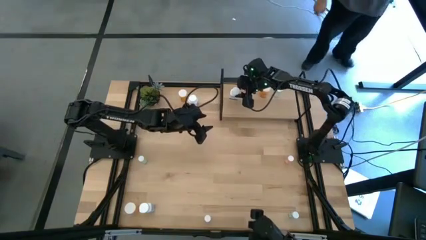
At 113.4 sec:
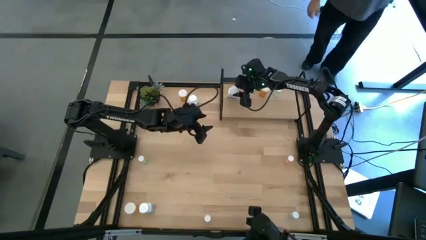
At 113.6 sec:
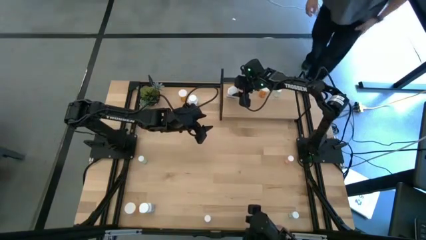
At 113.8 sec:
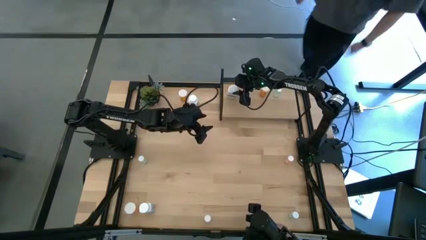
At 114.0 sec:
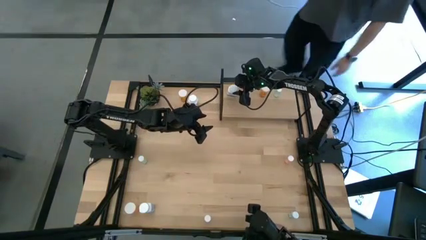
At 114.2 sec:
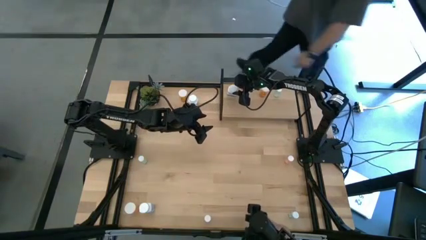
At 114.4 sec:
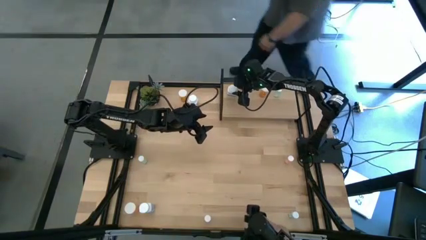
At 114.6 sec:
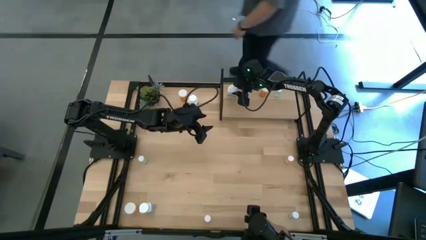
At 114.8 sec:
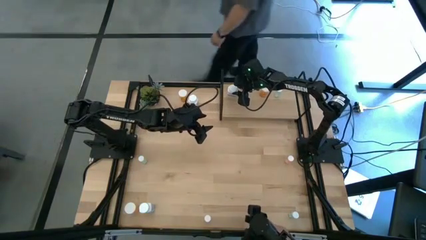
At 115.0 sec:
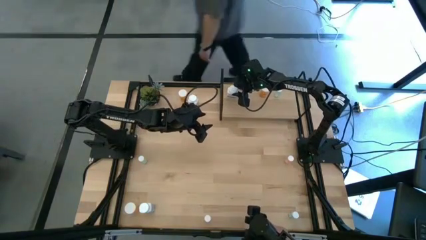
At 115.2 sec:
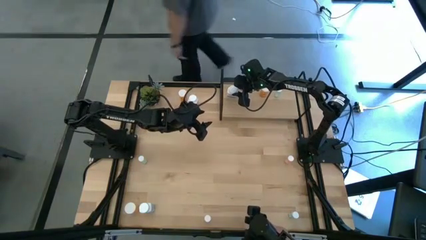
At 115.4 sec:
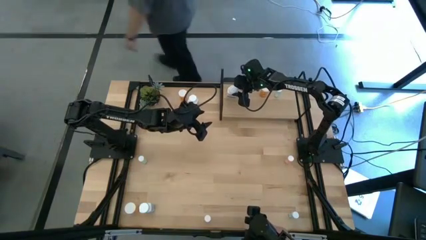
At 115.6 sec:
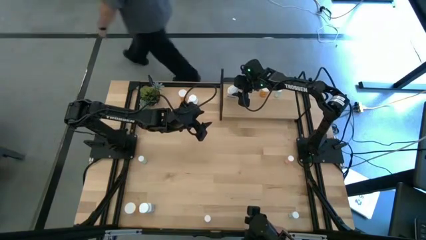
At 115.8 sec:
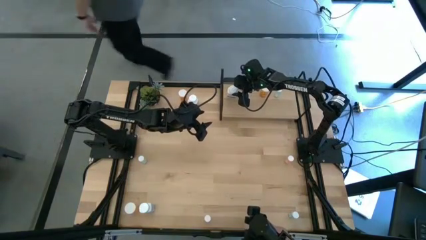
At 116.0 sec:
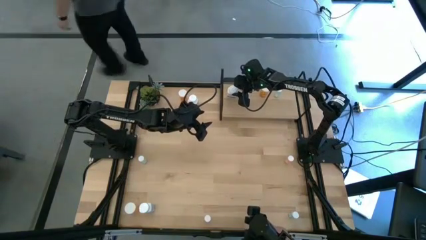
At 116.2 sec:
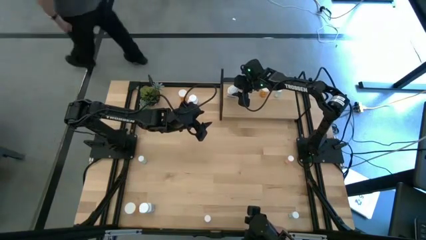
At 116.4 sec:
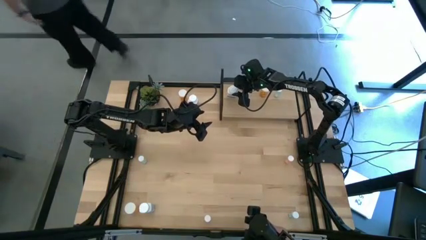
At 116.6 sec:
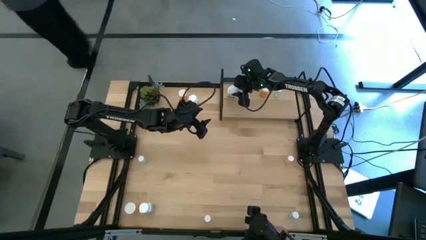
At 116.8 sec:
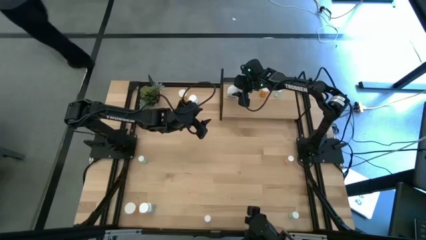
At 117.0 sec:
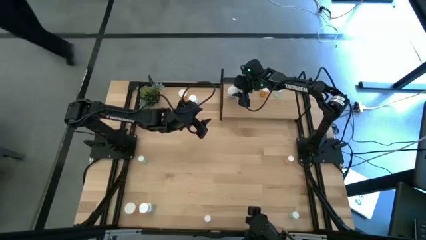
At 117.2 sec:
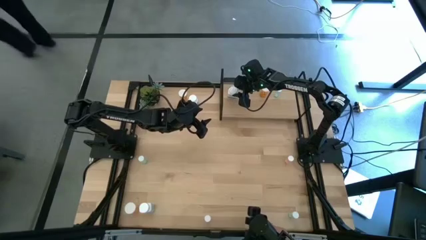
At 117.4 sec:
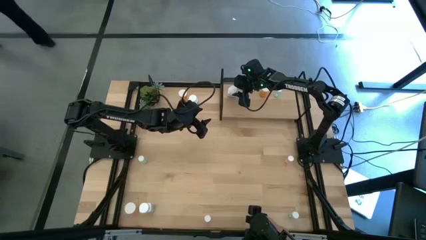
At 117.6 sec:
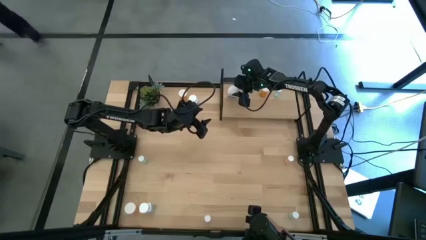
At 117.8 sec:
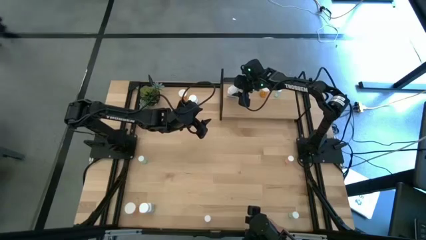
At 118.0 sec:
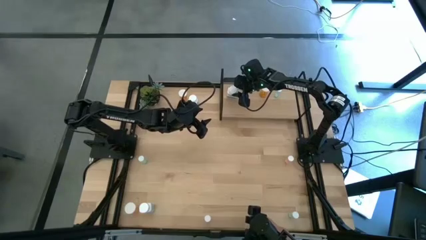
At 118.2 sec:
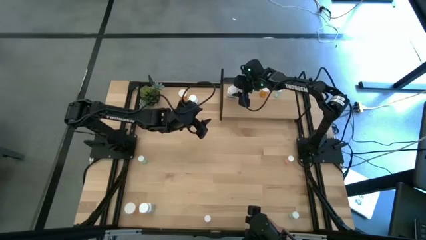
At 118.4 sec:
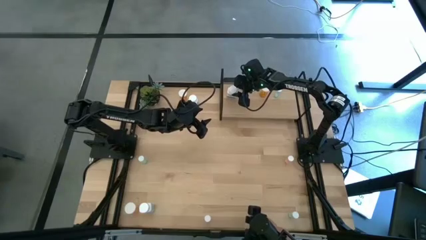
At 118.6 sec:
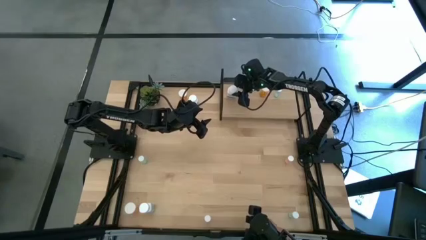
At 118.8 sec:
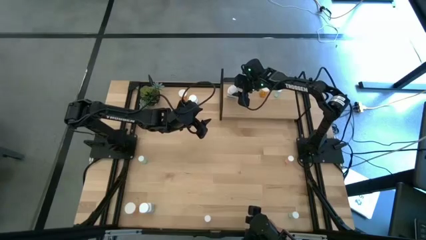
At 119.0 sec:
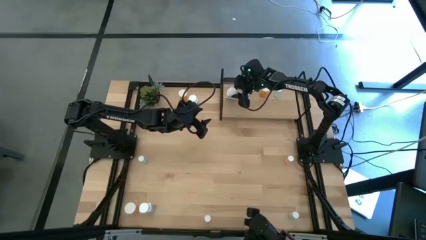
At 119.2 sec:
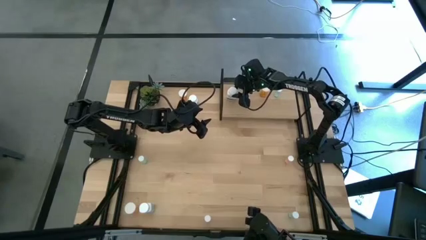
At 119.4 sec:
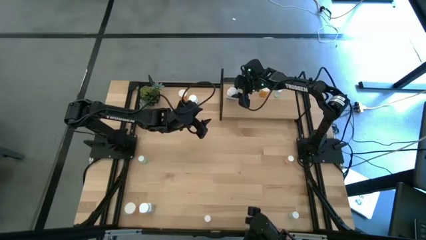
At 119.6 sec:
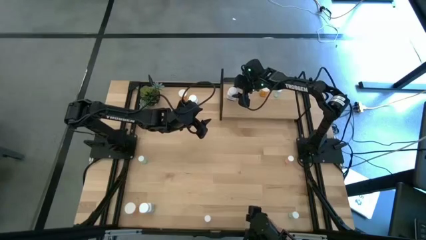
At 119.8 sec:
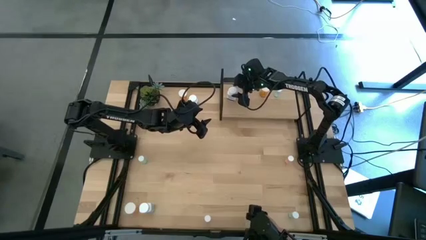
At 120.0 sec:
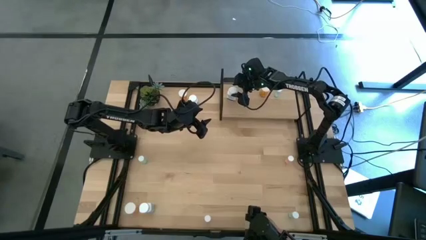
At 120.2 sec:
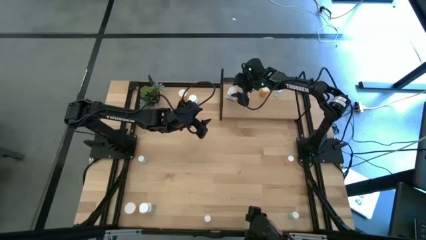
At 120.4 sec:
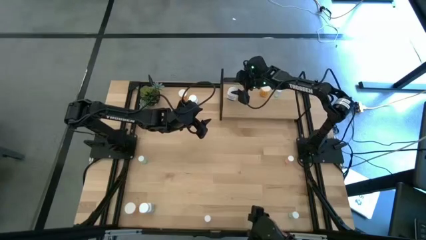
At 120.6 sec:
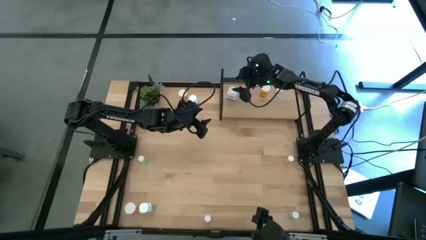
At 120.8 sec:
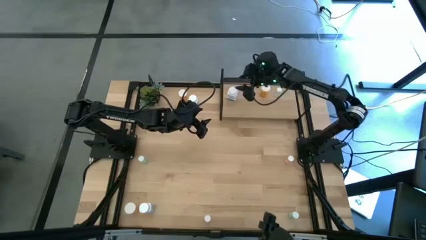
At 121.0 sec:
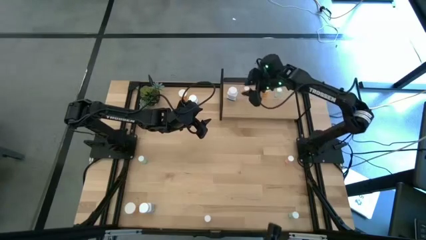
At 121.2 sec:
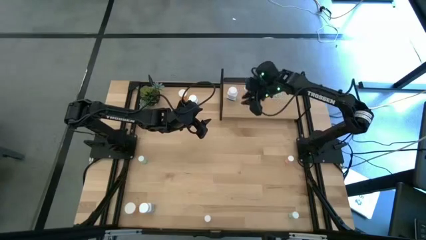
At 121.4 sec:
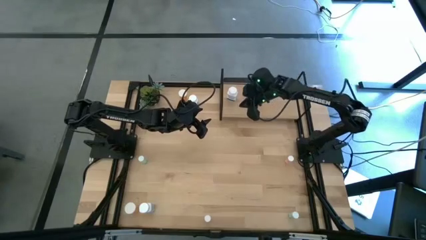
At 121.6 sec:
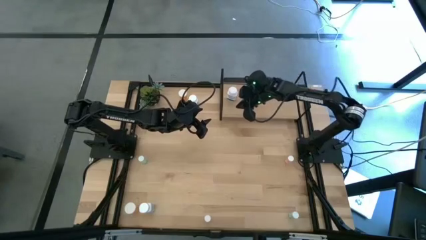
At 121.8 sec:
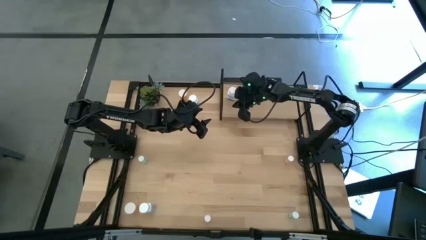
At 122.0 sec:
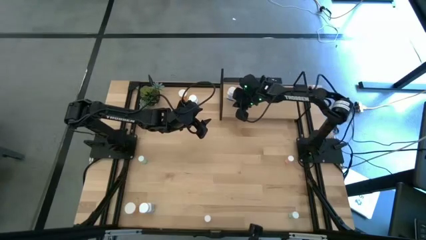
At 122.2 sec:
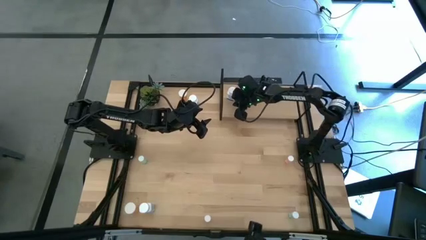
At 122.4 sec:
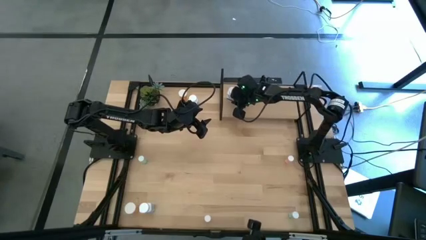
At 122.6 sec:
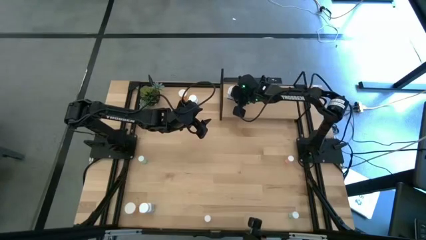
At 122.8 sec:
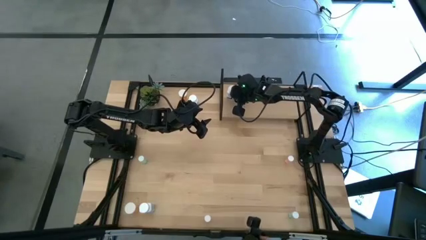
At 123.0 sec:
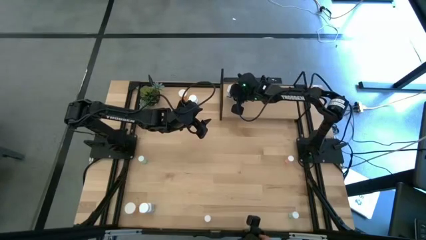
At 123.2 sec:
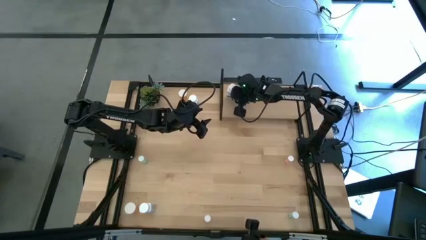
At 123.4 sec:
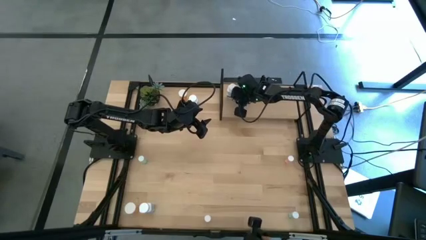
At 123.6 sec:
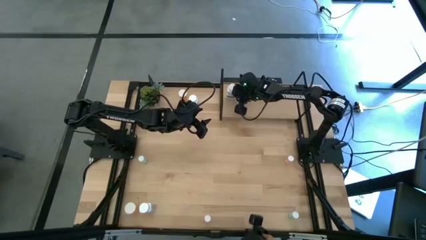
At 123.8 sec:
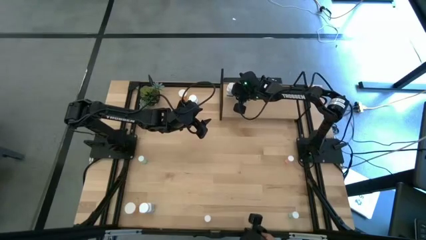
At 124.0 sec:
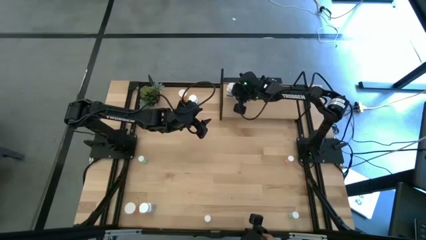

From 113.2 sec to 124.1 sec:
Task: Pick and place medicine bottles onto shelf by color
Put the middle white pill bottle on the shelf

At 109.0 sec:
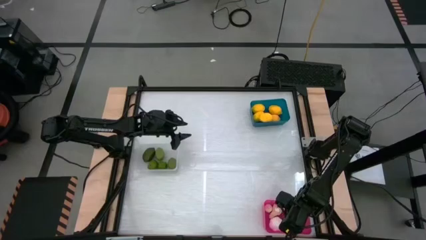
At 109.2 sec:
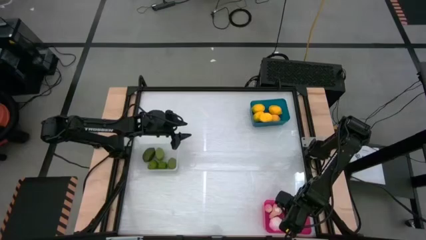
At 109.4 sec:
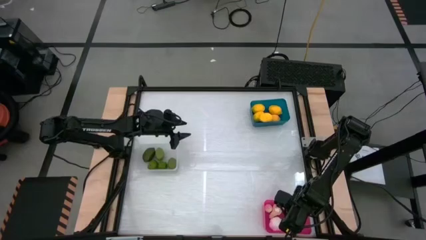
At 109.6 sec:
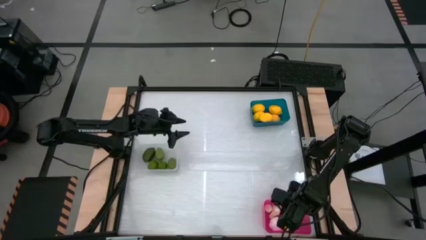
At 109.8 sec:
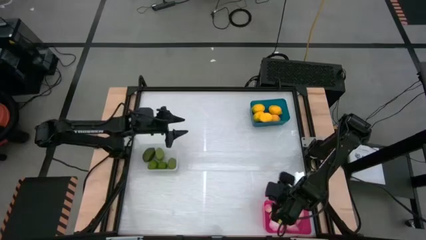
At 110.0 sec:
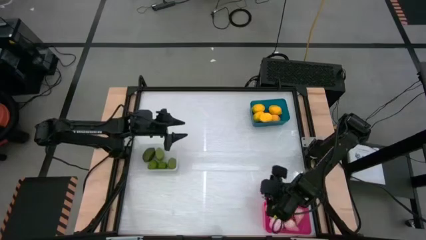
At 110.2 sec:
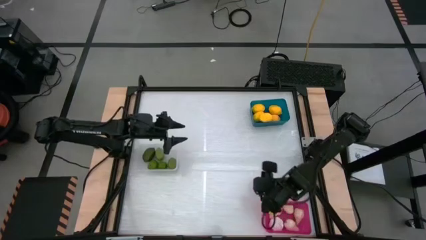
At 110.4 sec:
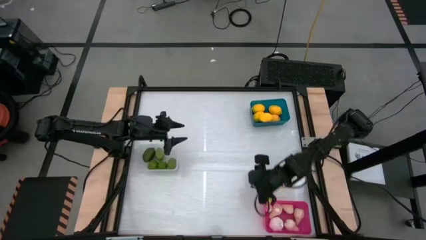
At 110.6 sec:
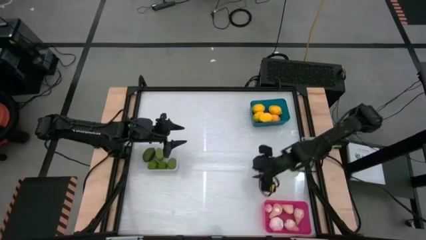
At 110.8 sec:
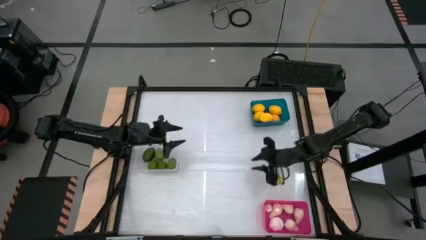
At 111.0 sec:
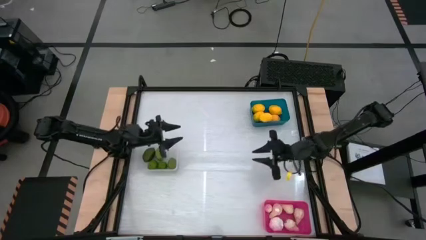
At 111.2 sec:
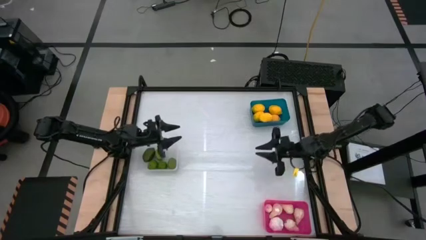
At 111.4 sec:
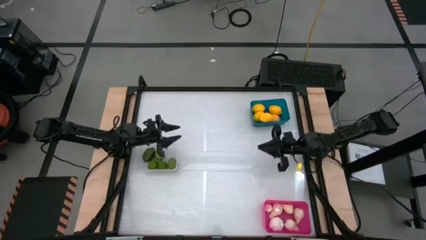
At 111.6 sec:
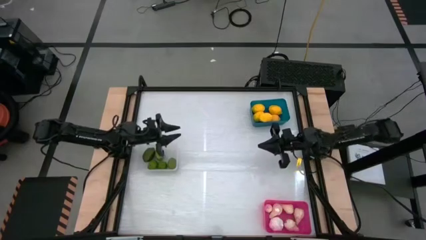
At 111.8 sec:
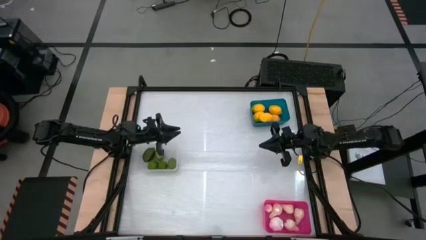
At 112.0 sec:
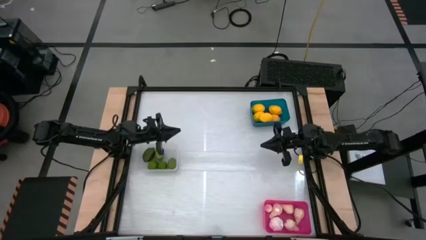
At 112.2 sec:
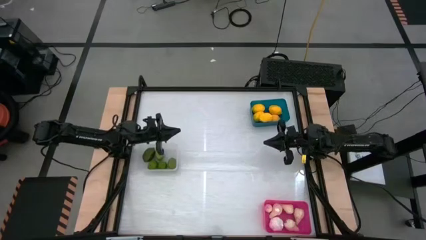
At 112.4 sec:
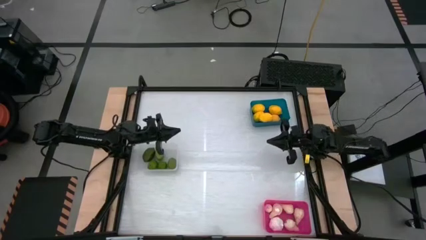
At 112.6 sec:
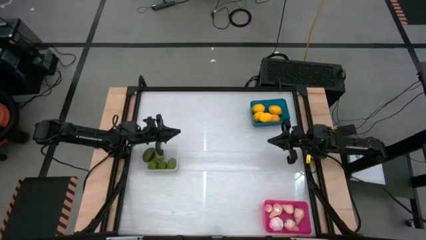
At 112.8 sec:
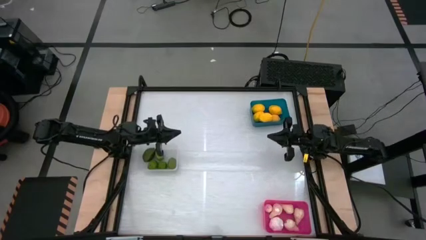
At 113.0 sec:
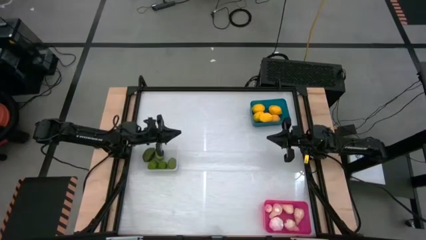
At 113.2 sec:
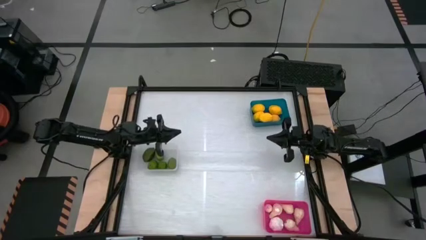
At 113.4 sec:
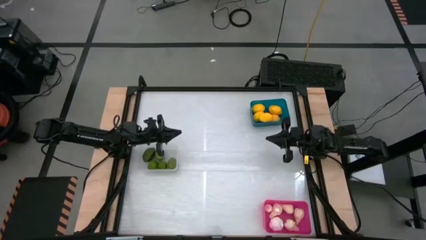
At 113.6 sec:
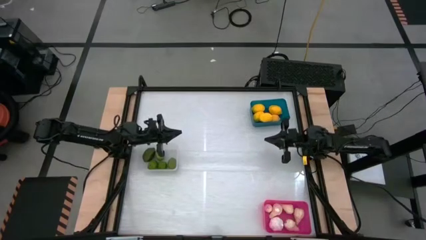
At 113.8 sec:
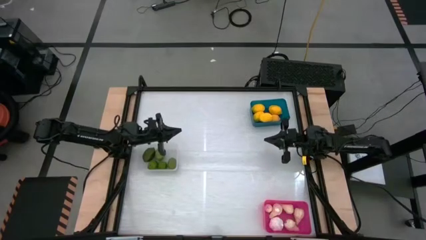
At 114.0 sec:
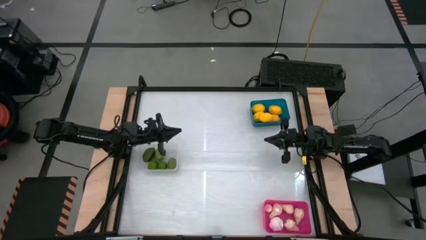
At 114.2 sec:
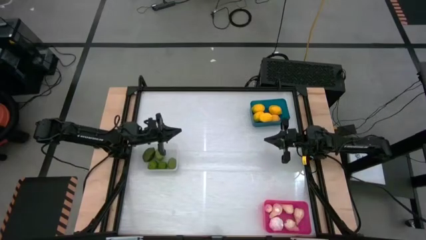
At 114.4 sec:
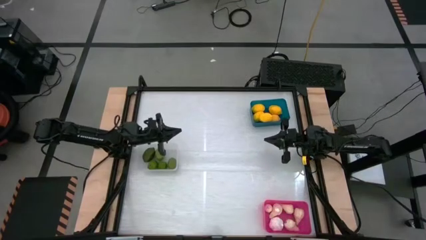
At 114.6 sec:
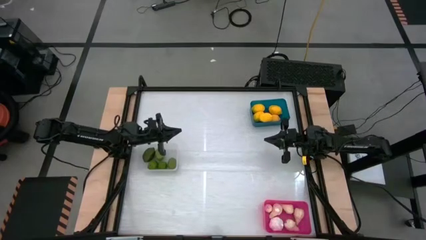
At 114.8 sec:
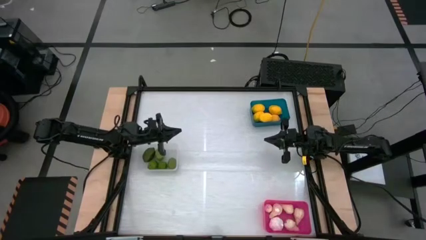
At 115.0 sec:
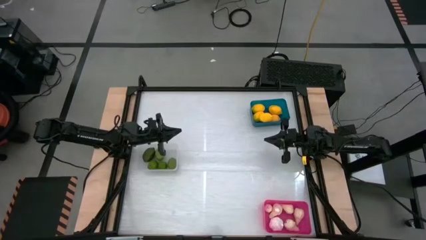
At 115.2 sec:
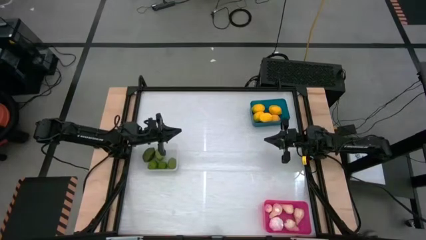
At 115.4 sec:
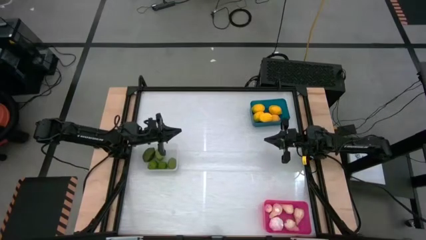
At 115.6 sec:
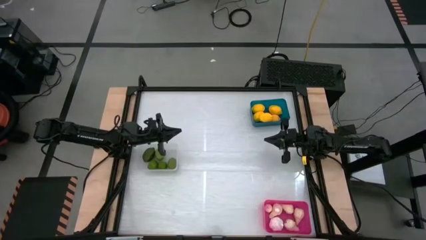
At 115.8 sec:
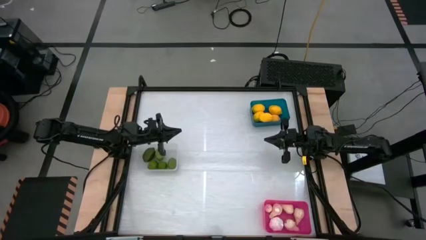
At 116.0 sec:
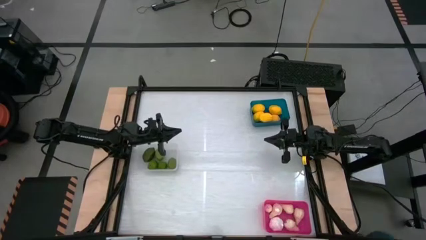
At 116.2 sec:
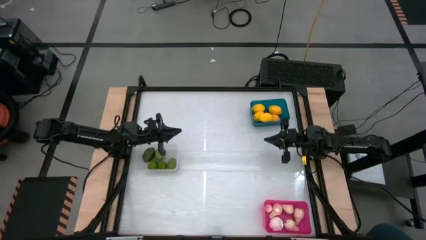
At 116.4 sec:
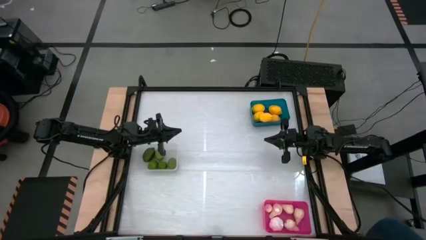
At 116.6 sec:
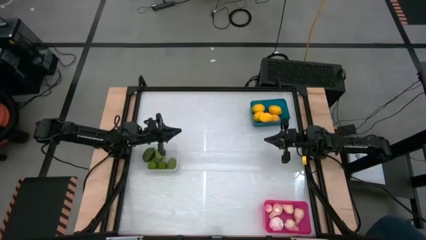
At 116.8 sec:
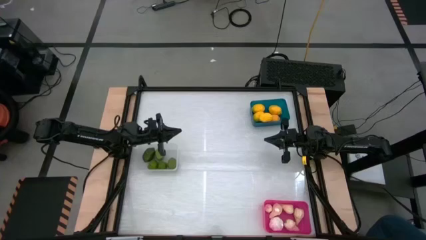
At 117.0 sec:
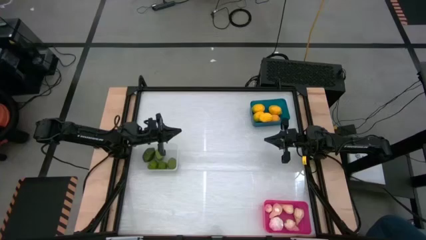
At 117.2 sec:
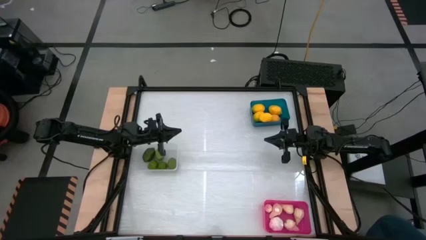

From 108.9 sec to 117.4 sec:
Task: Sort produce into baskets
Return to Home Position
